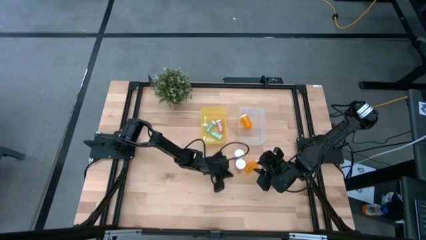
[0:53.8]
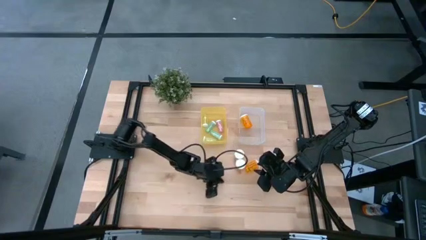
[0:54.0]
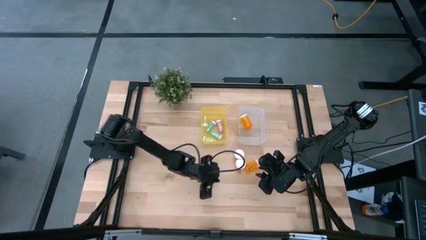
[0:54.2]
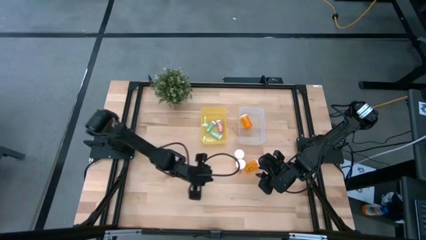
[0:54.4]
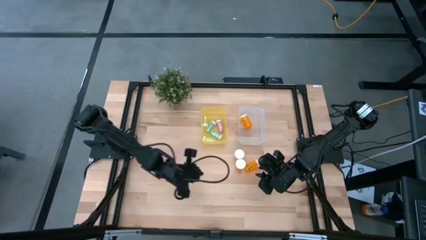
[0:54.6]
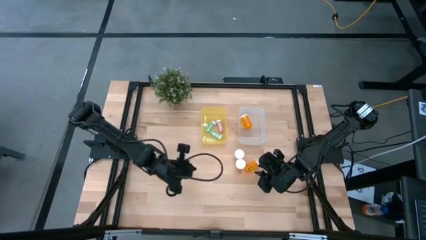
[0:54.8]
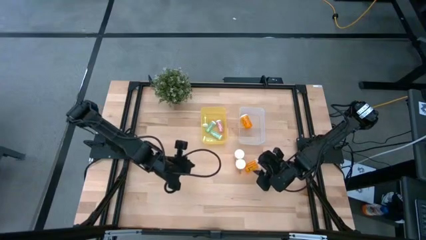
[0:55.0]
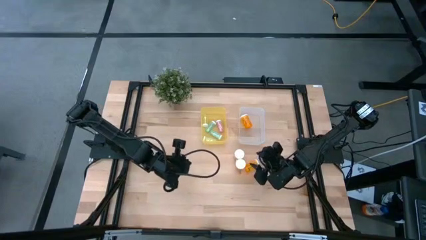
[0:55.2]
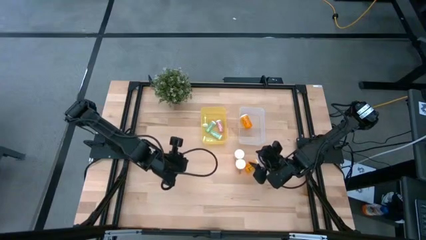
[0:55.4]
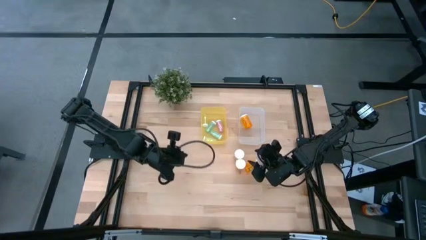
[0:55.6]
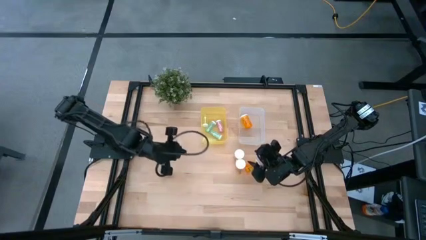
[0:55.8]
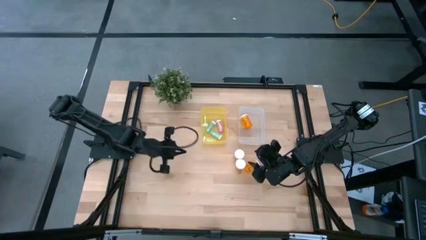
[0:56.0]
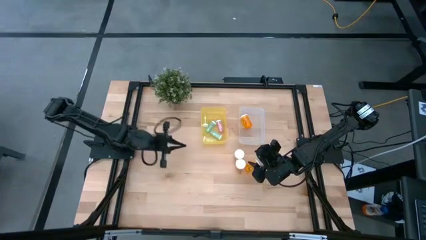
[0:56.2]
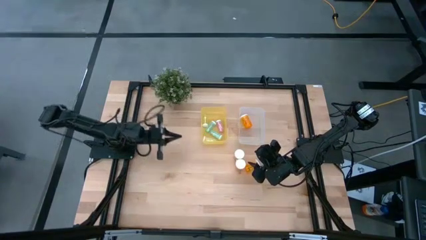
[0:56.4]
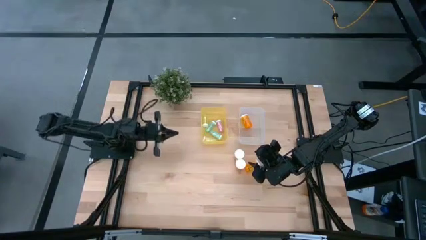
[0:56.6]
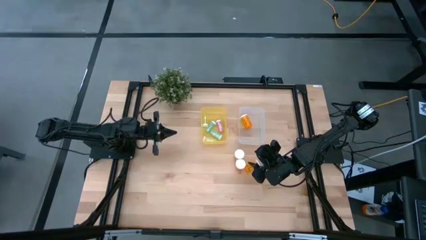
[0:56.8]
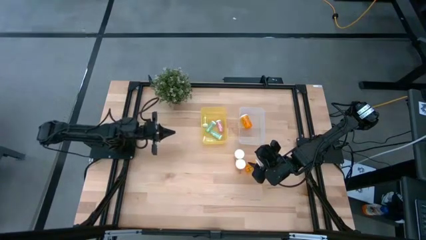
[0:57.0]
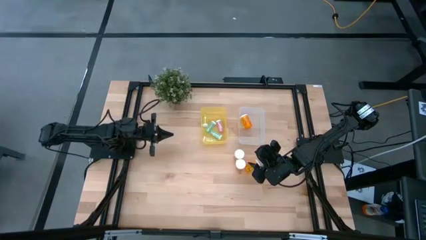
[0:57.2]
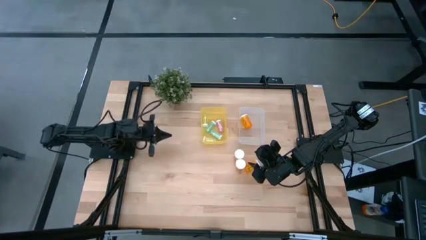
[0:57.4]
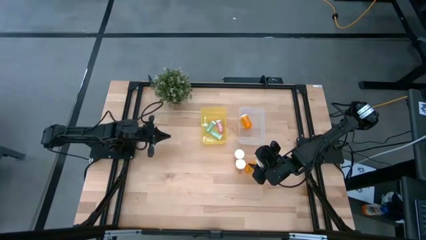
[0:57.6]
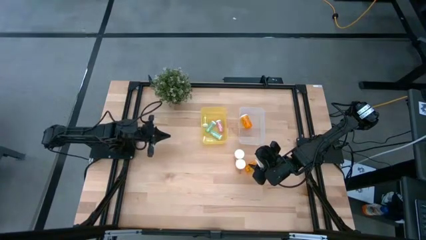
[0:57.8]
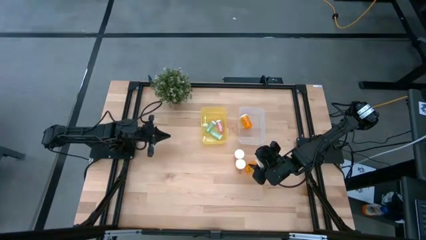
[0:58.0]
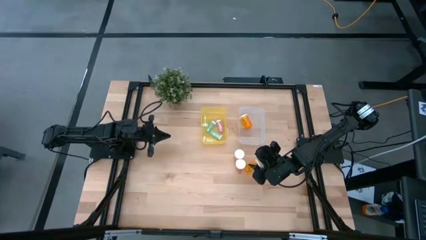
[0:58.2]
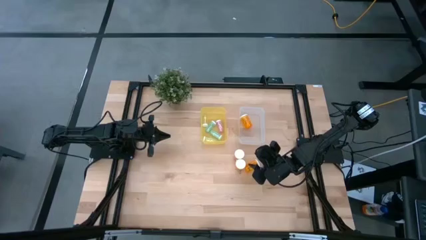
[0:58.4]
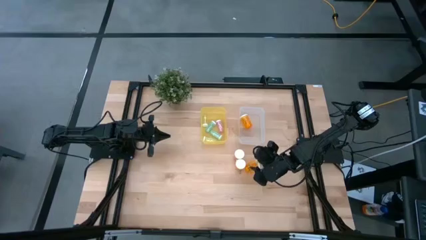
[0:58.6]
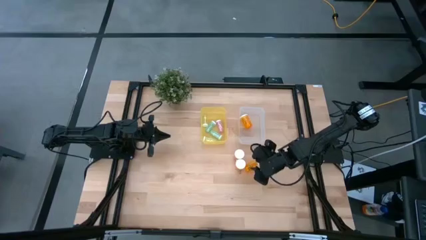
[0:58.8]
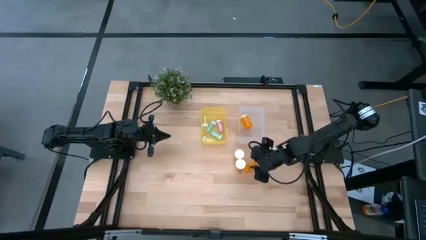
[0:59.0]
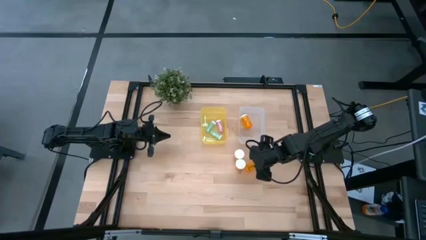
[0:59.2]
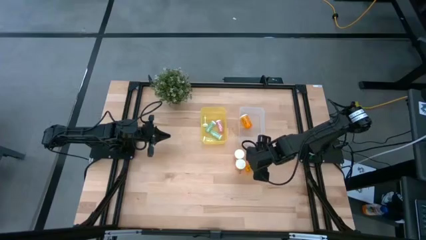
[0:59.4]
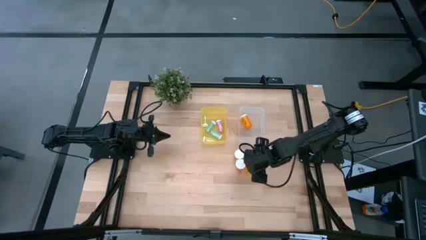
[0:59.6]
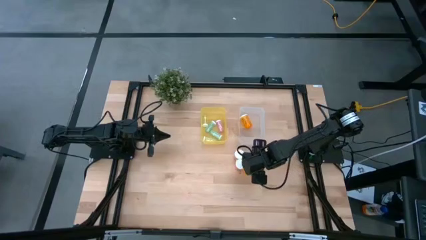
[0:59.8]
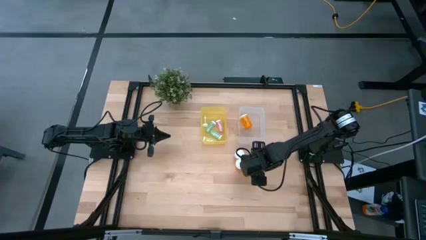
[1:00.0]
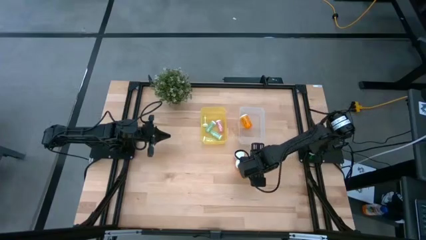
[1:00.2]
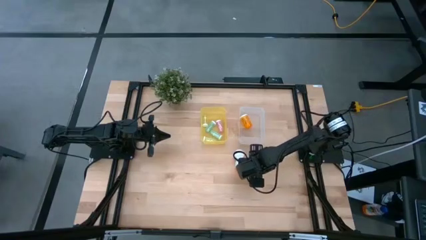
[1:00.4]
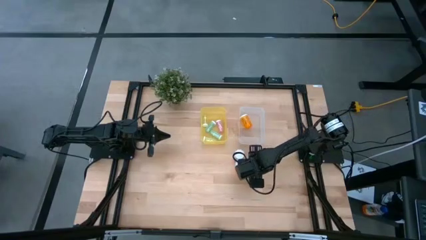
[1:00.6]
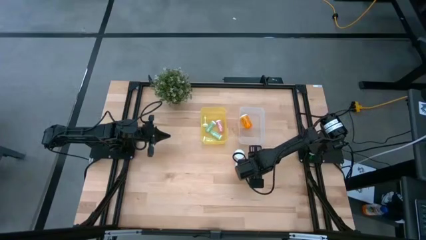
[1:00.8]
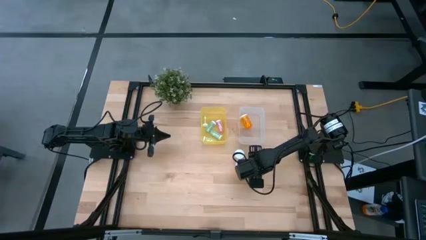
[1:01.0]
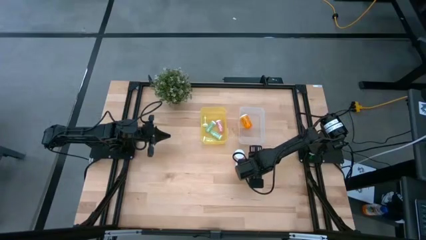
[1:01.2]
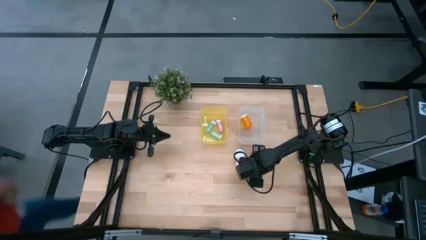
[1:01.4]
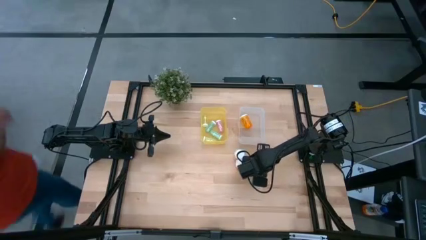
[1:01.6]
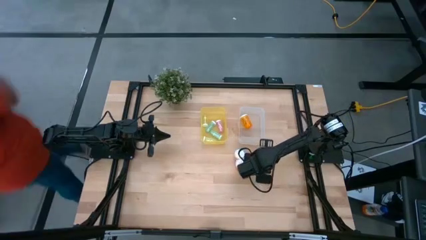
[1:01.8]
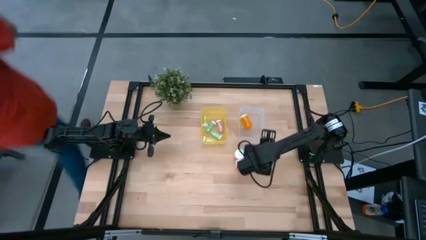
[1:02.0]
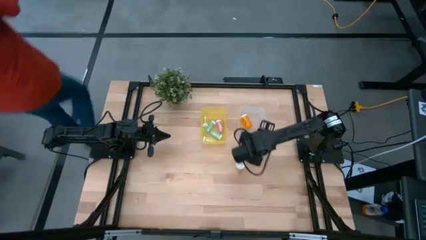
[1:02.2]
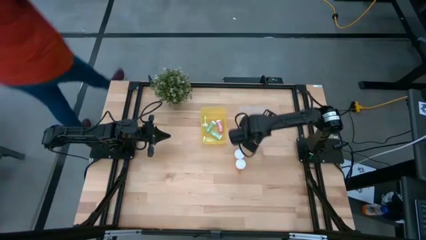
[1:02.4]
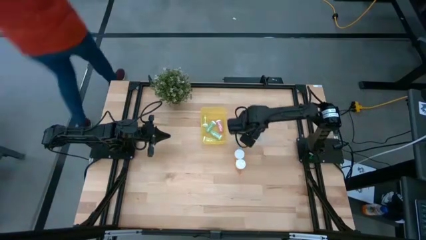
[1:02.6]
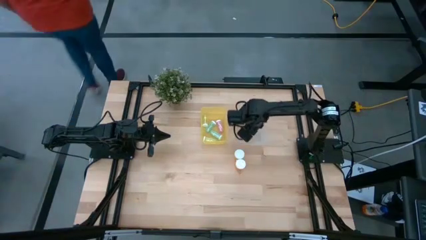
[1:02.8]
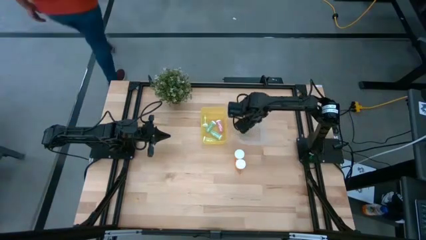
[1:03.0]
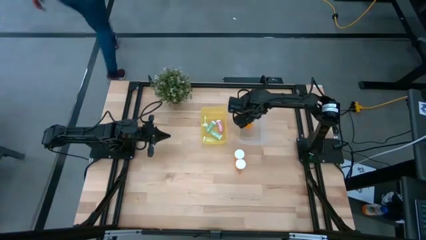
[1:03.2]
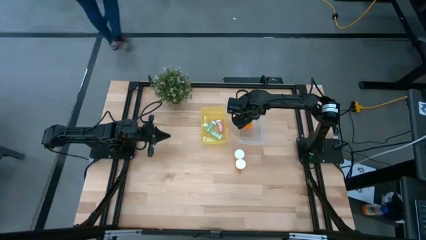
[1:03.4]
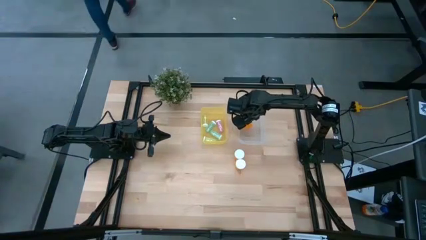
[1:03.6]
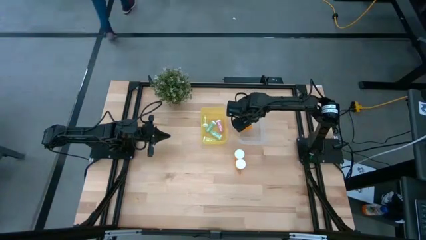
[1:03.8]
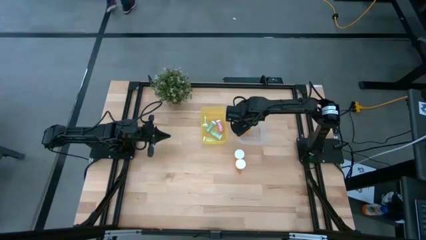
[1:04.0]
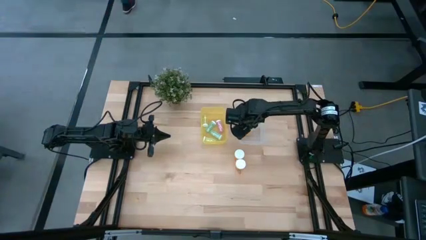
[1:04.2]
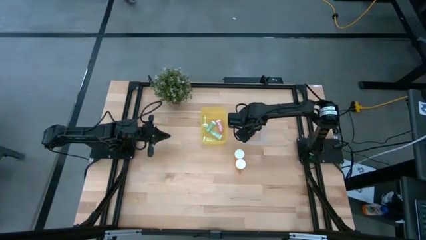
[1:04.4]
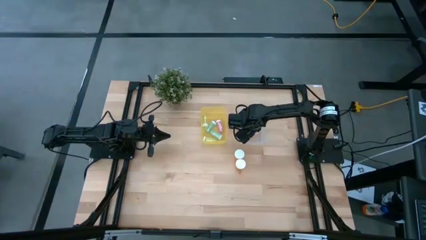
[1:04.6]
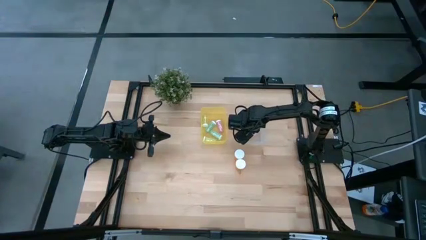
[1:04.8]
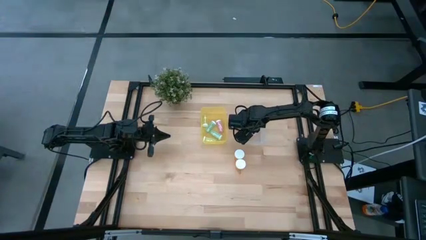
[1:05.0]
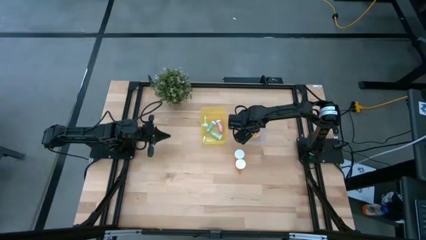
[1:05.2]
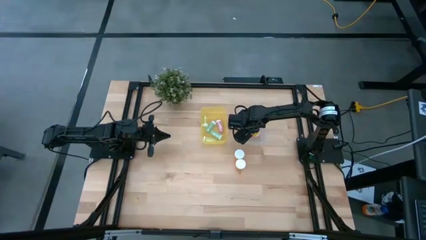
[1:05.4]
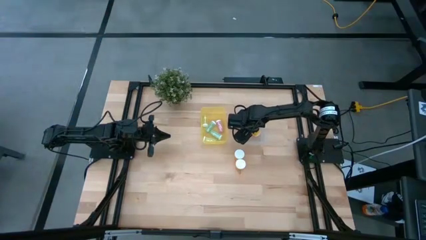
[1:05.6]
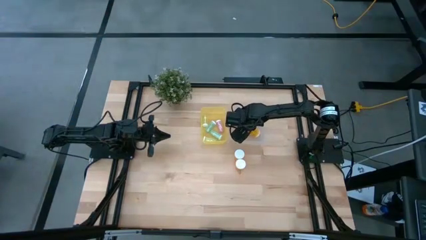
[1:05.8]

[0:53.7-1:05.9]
Task: Pick and place medicine bottles into bin by pill shape (circle, oval)
Put the large orange pill bottle into the transparent bin
